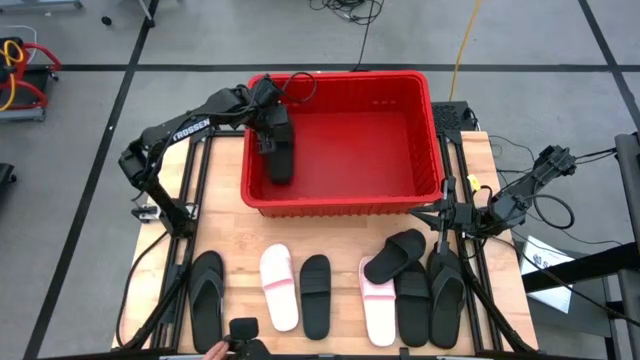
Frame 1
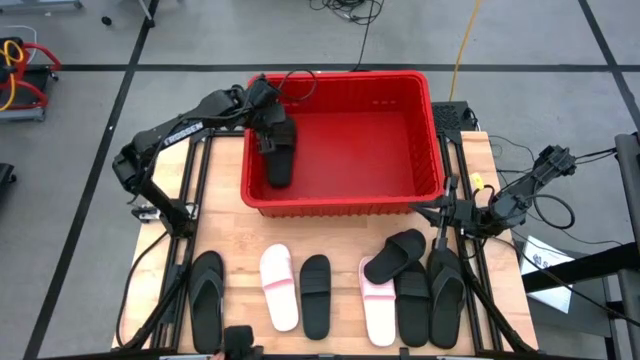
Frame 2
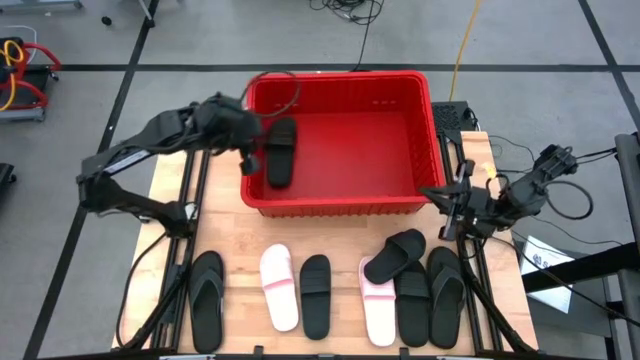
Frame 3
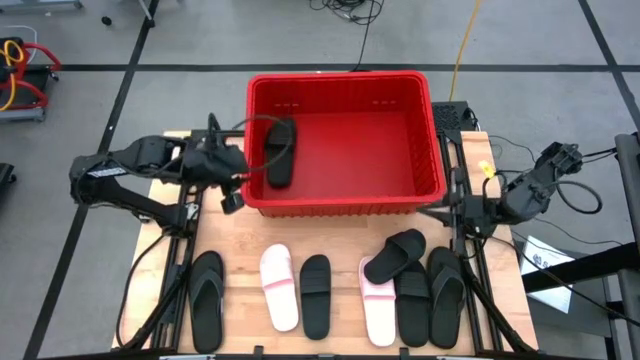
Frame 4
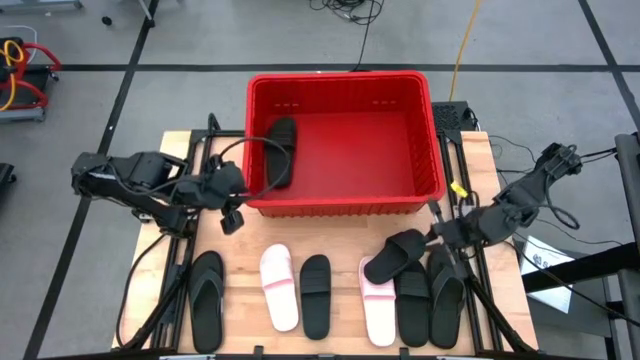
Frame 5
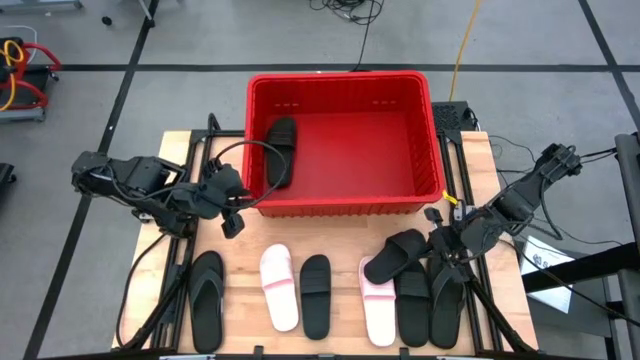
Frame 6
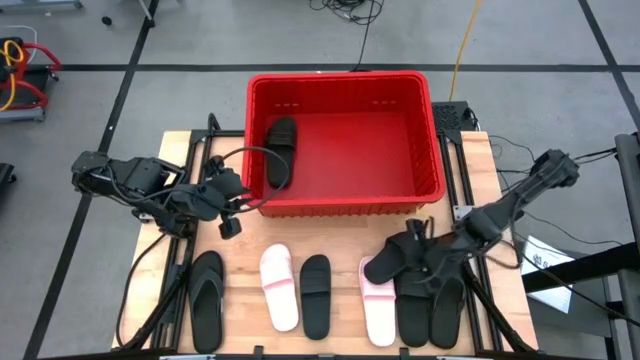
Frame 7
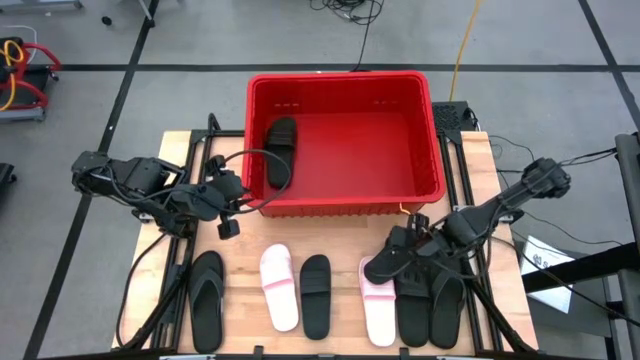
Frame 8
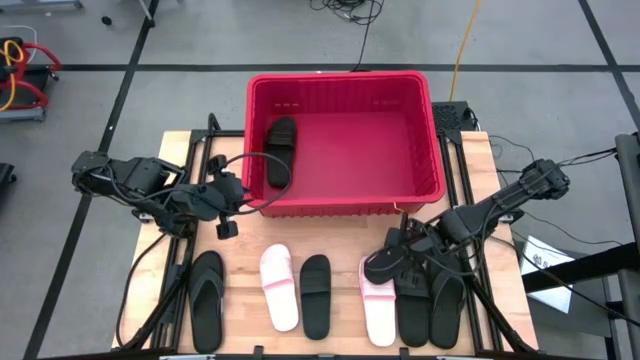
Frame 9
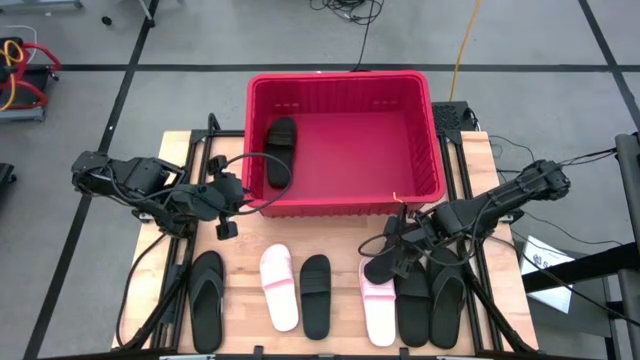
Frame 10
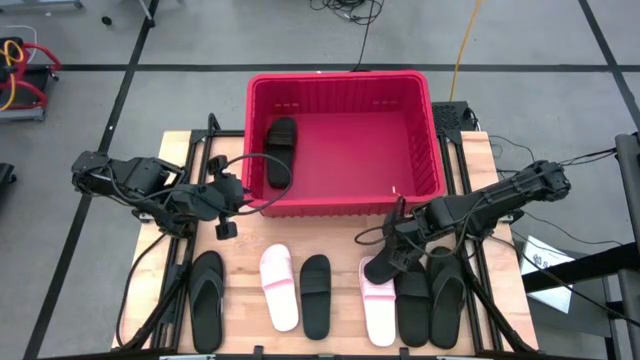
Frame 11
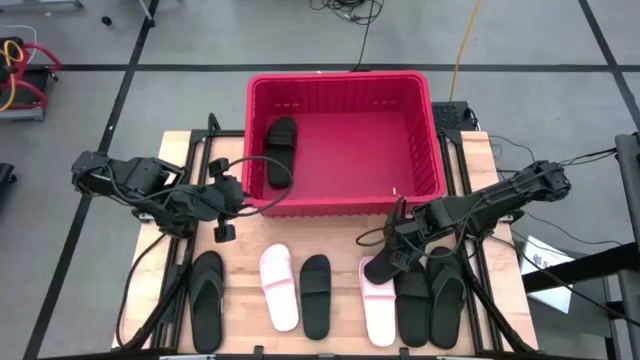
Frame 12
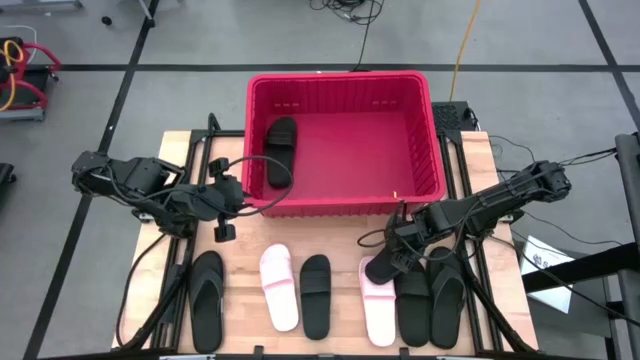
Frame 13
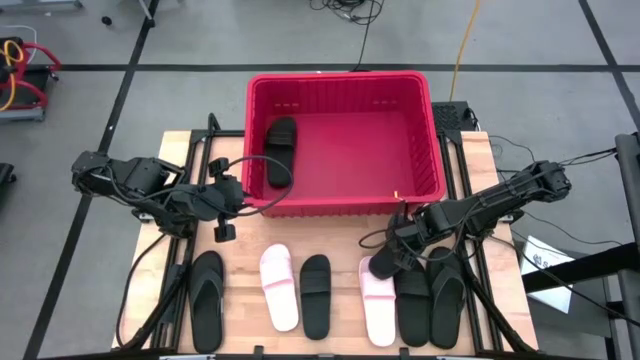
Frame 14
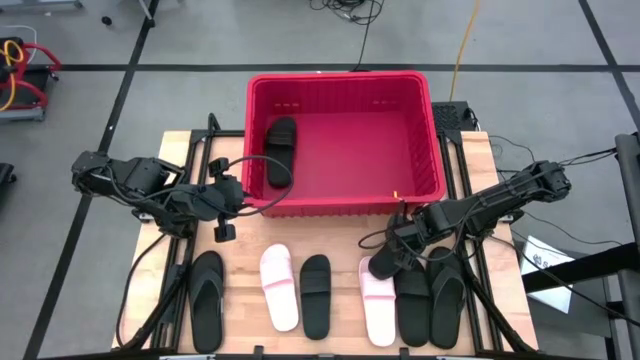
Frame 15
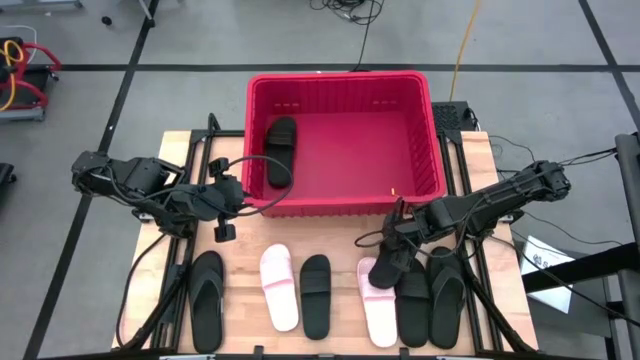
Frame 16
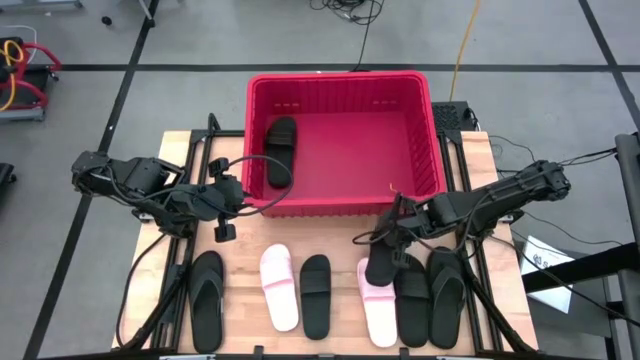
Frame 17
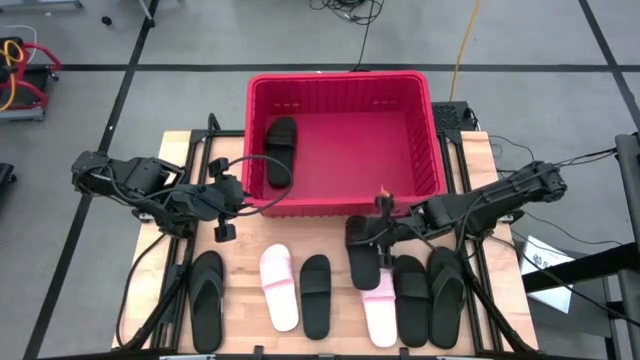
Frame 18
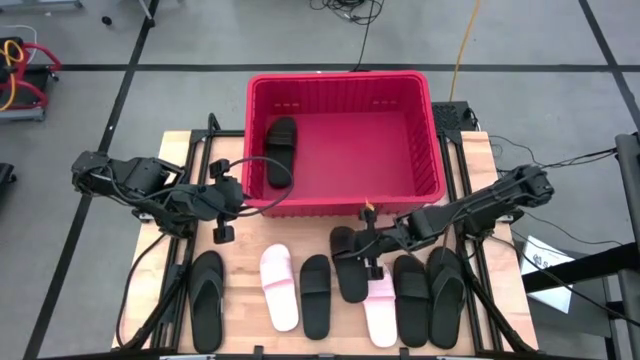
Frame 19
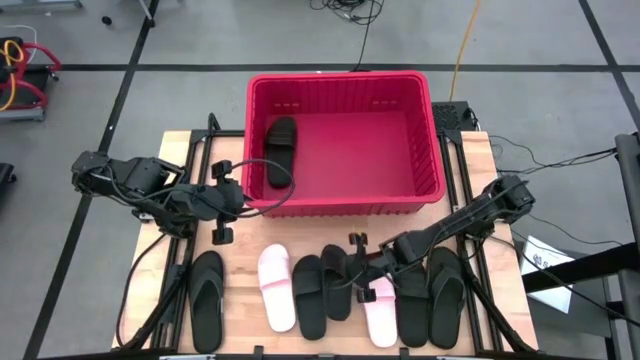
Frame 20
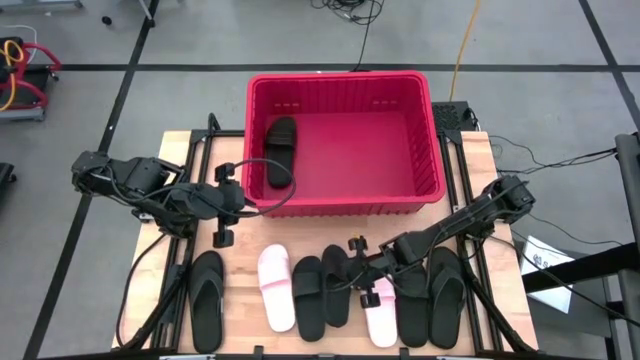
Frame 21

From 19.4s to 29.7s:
Task: Pick and place slides into bin
Move the black slide to the bottom center of the table

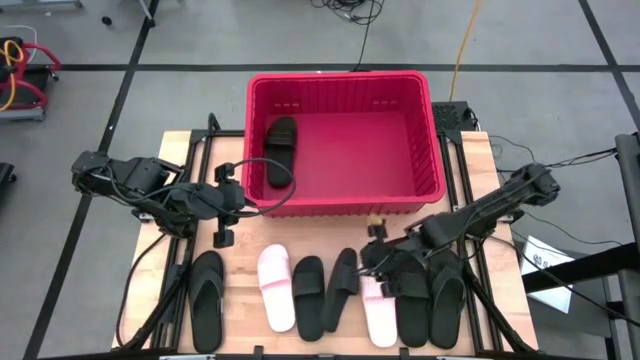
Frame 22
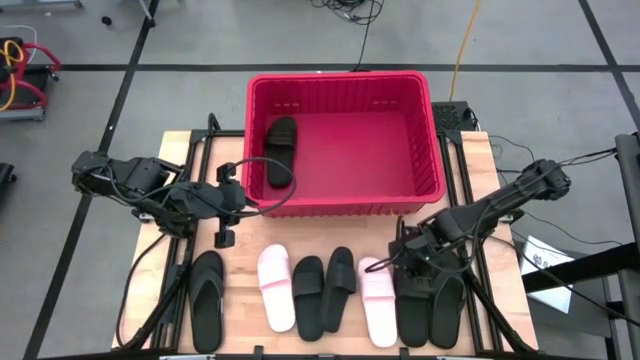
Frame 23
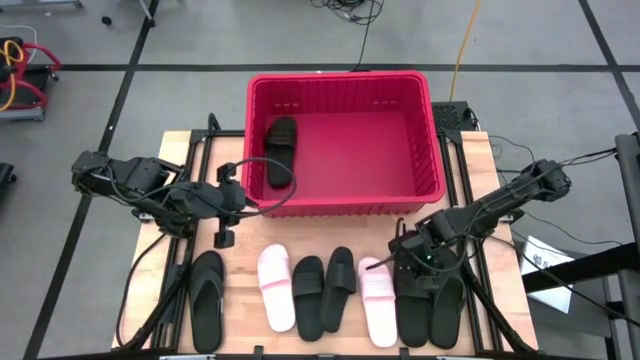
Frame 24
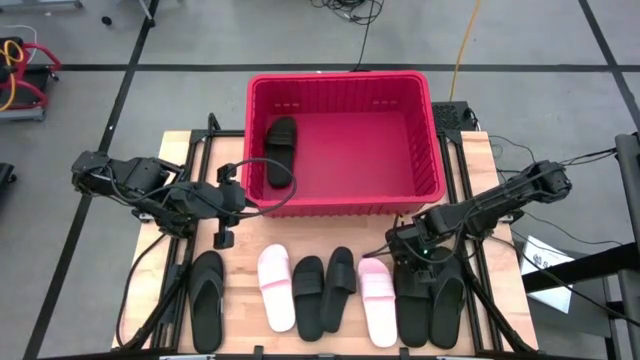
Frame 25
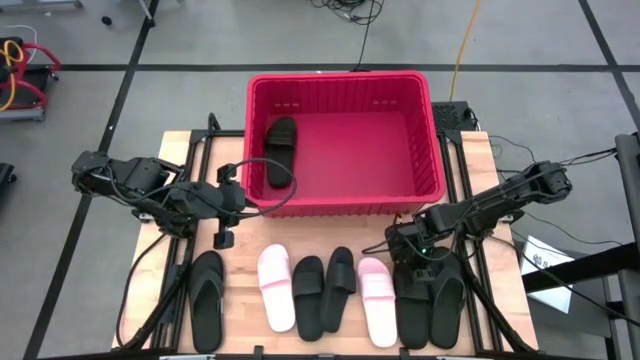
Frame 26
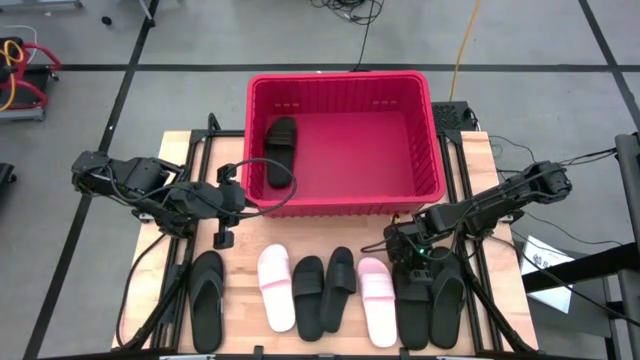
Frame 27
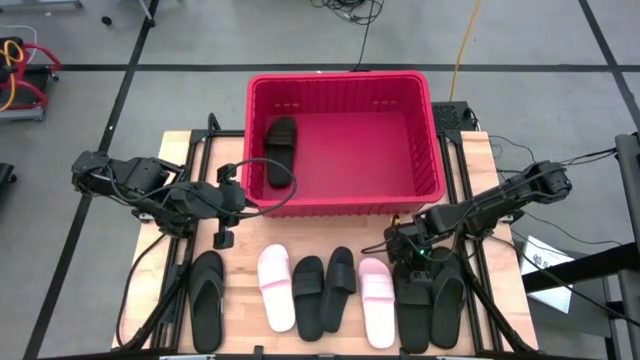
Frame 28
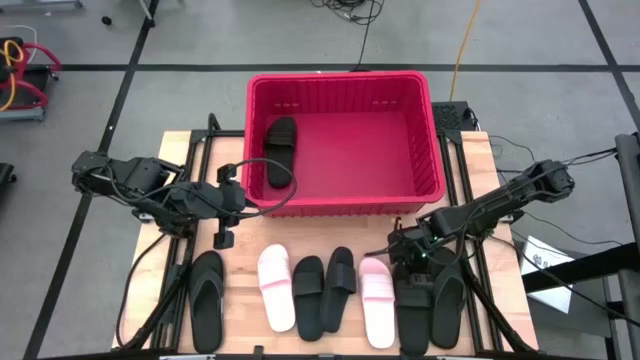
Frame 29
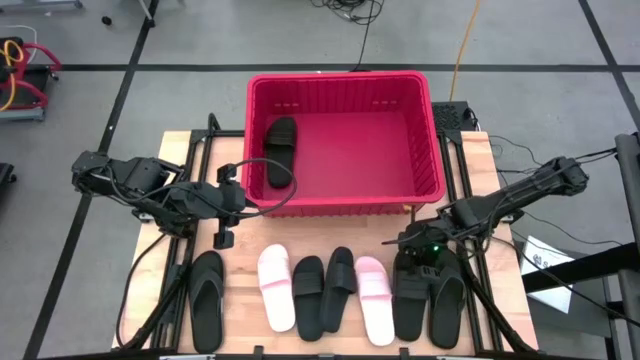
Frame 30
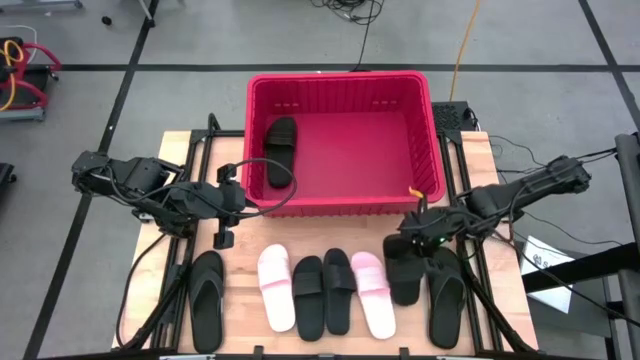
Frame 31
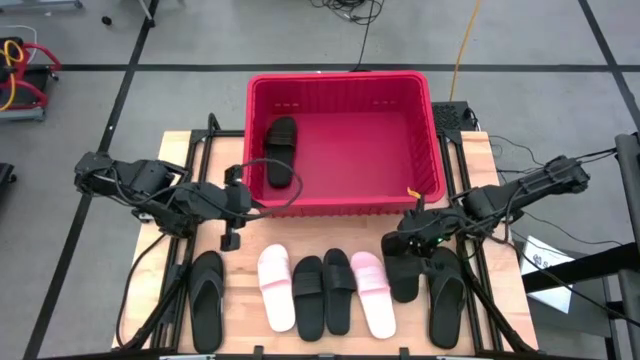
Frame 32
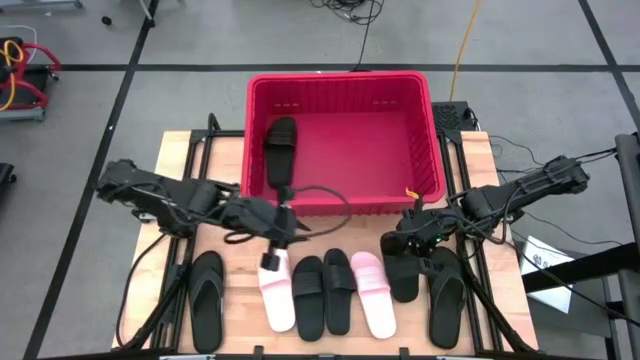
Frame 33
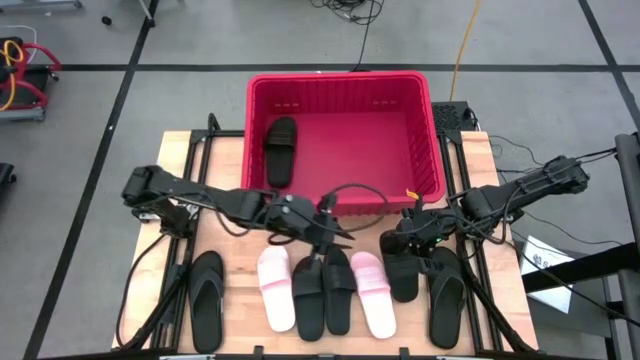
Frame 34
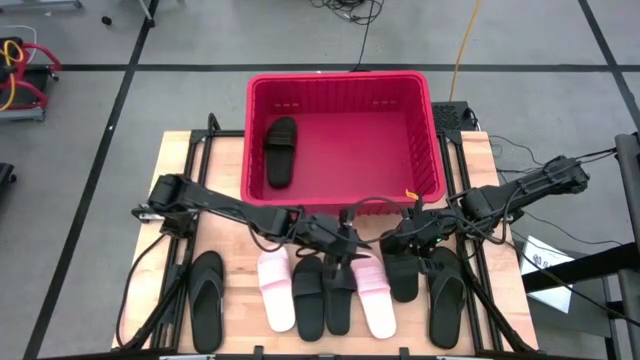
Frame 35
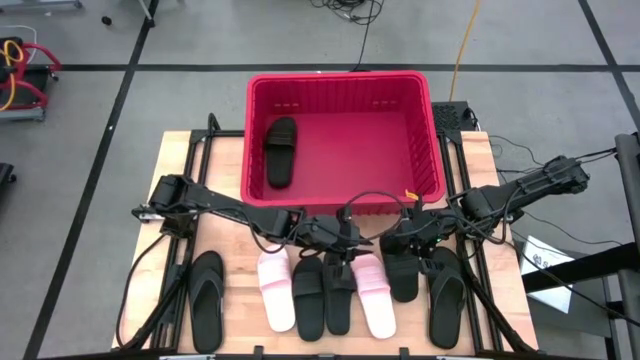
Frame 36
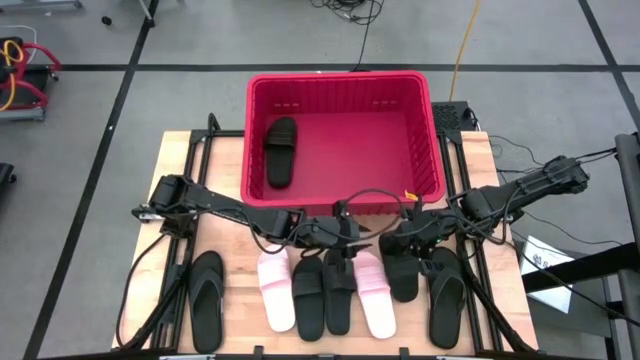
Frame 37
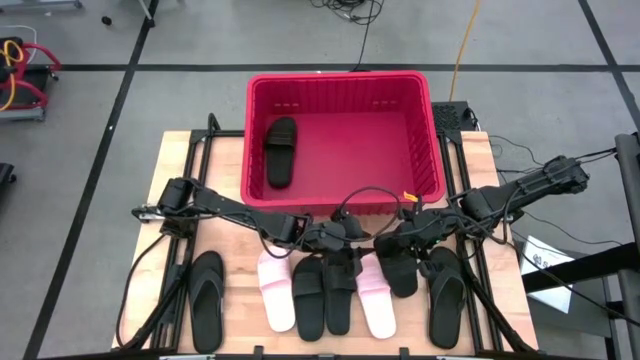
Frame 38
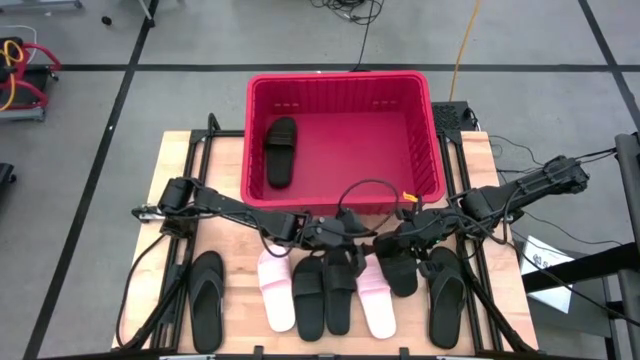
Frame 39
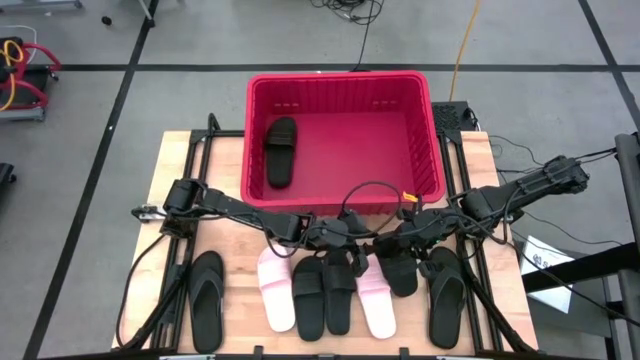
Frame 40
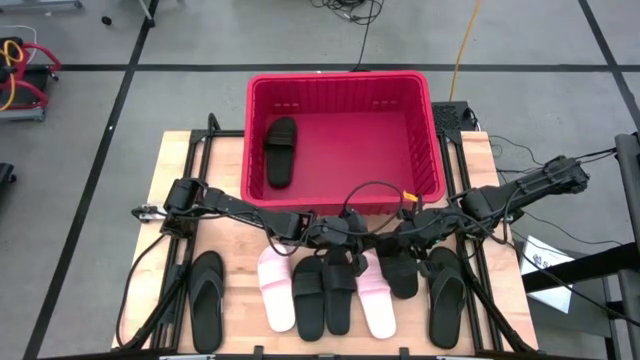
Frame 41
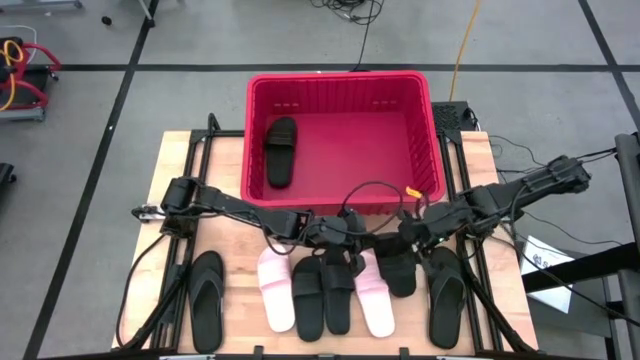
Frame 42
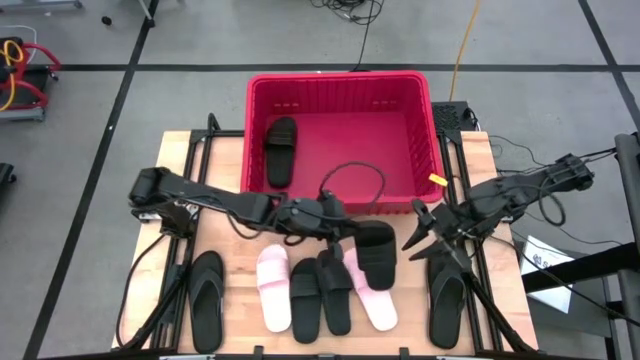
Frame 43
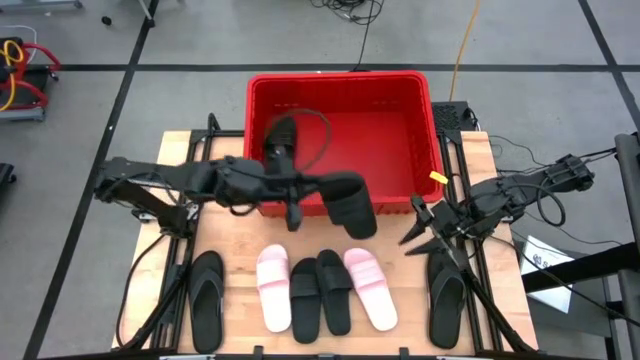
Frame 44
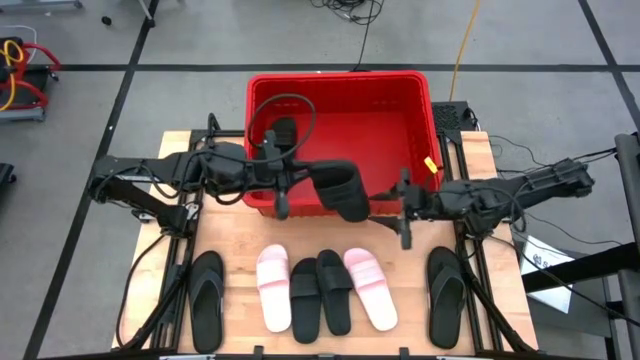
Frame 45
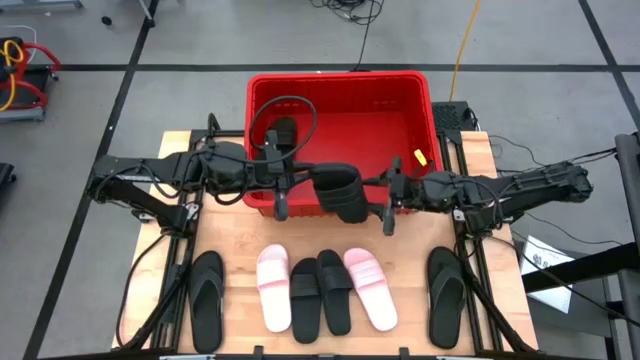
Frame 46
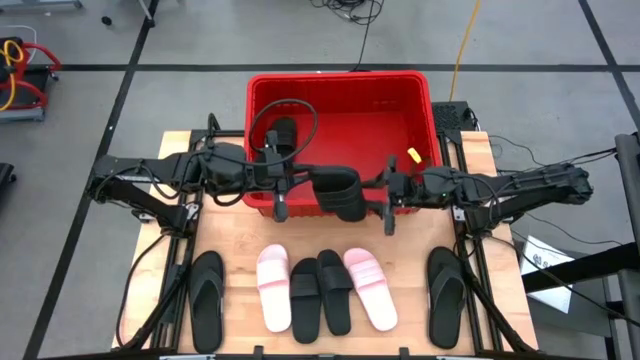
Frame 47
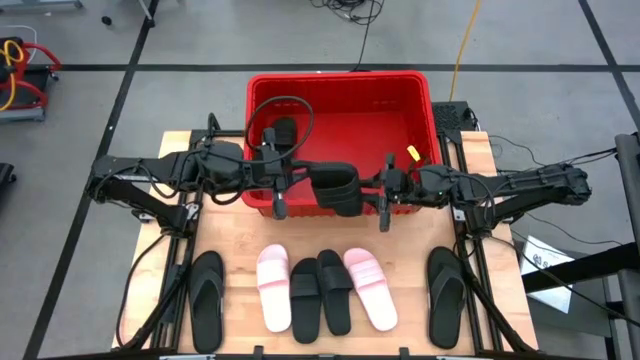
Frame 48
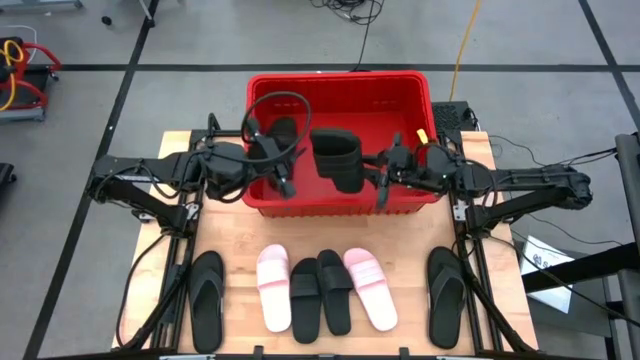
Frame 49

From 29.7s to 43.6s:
Put the black slide into the red container
